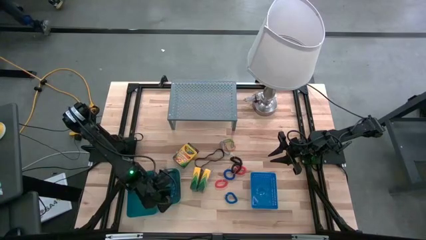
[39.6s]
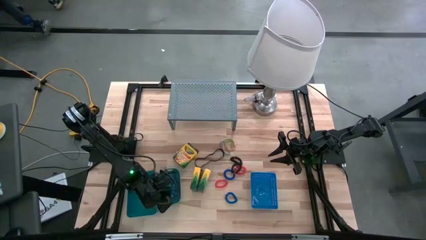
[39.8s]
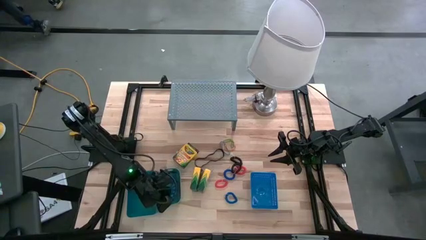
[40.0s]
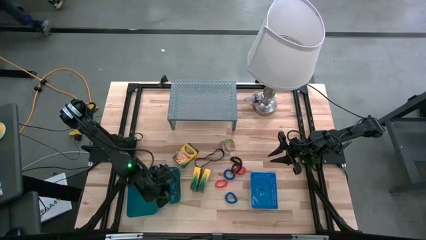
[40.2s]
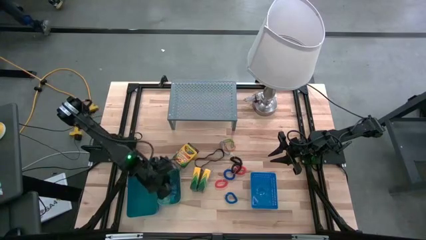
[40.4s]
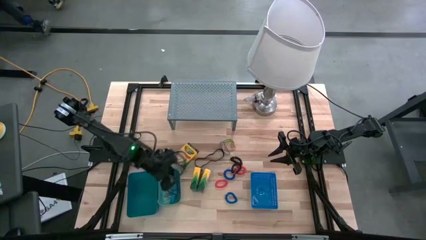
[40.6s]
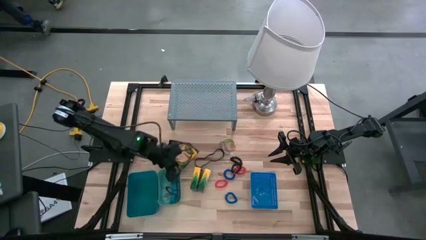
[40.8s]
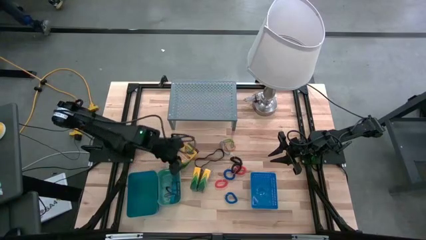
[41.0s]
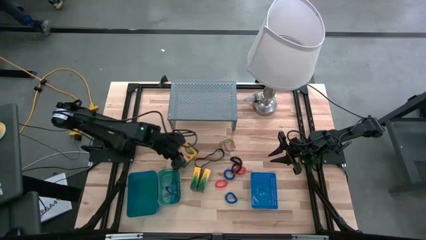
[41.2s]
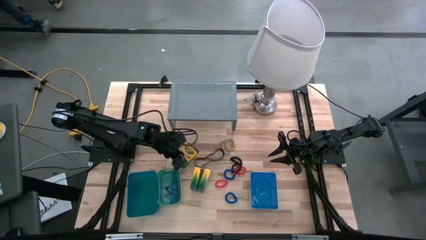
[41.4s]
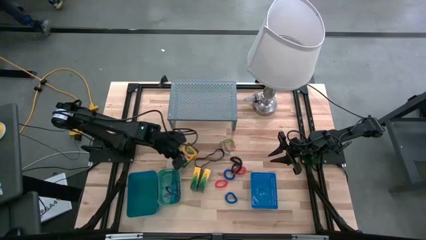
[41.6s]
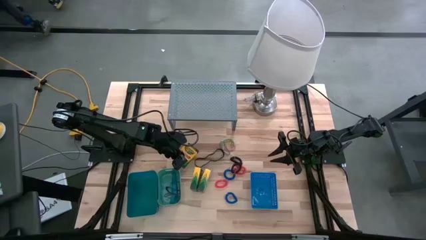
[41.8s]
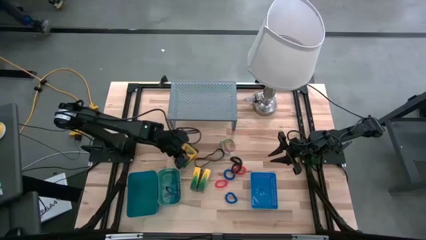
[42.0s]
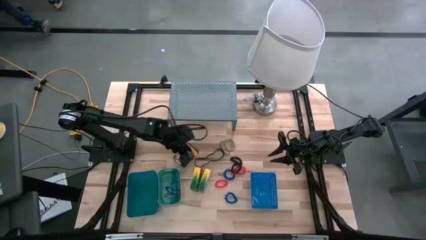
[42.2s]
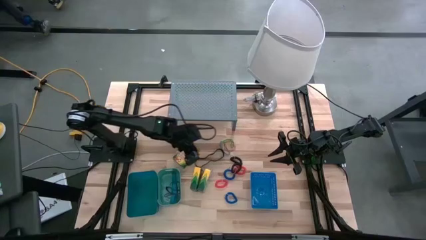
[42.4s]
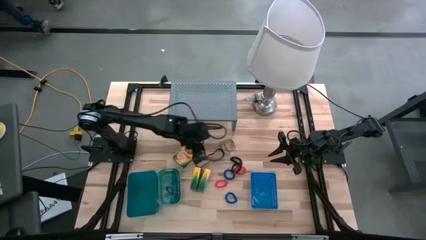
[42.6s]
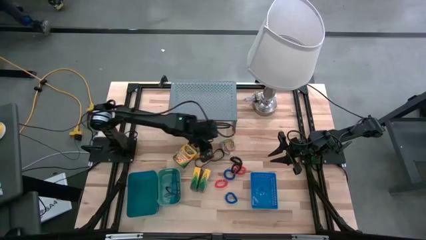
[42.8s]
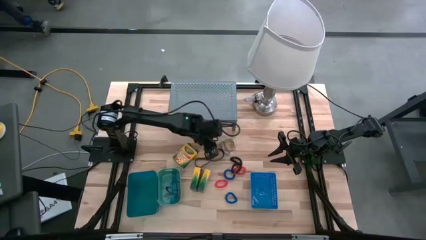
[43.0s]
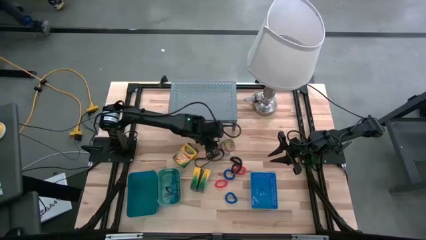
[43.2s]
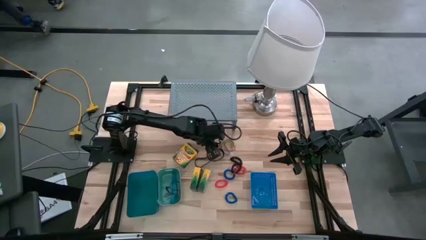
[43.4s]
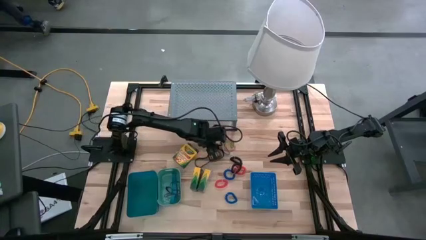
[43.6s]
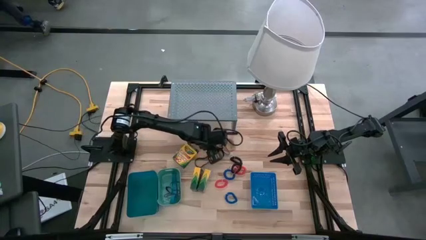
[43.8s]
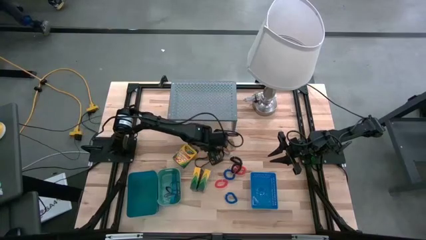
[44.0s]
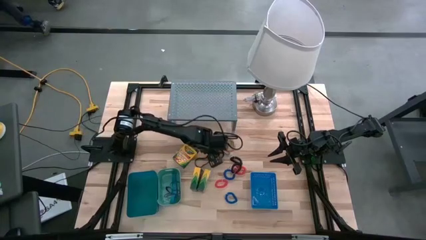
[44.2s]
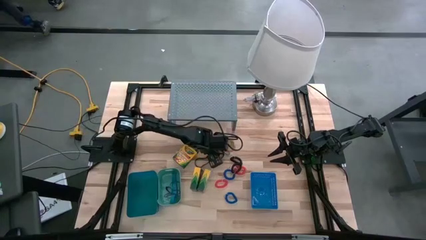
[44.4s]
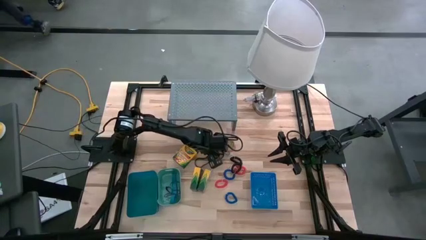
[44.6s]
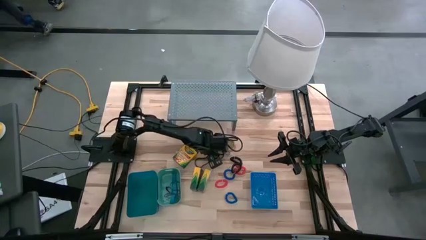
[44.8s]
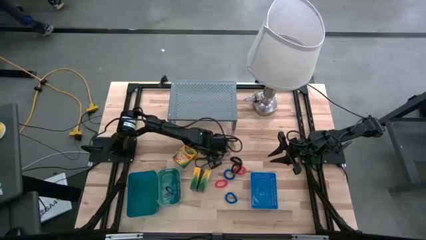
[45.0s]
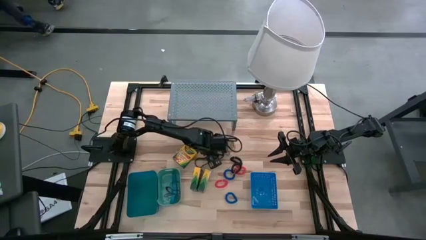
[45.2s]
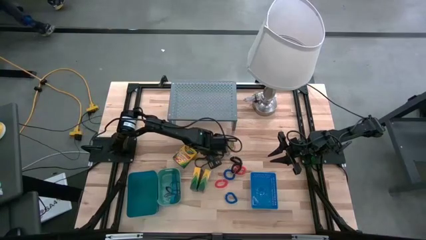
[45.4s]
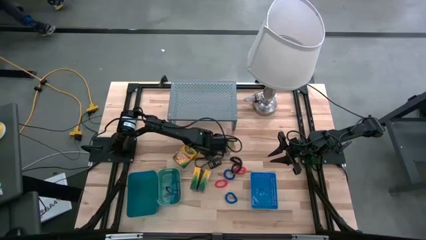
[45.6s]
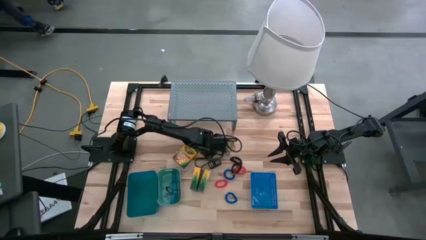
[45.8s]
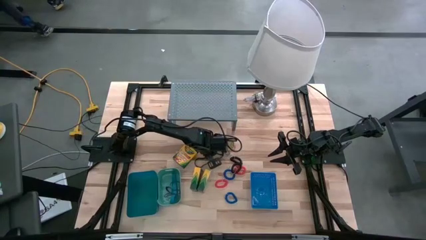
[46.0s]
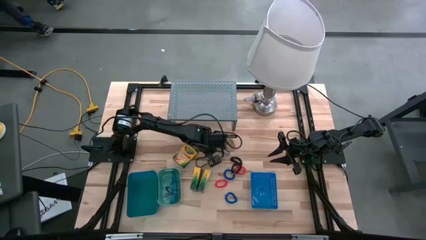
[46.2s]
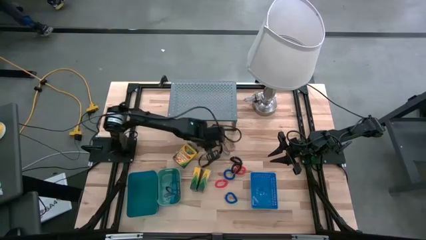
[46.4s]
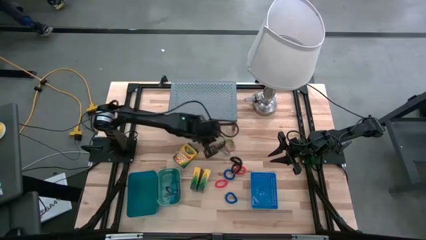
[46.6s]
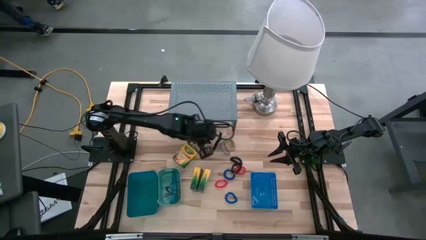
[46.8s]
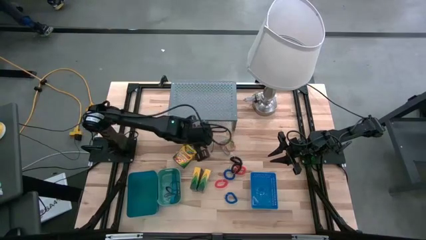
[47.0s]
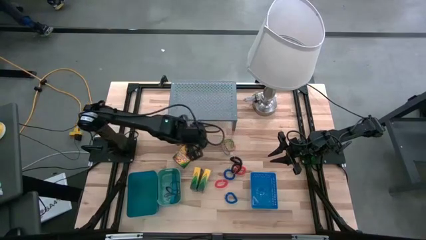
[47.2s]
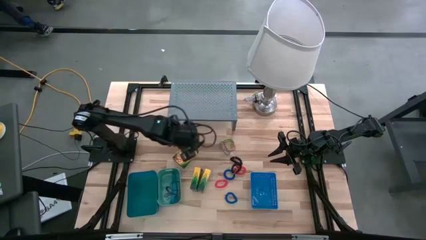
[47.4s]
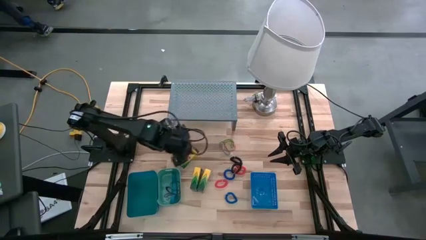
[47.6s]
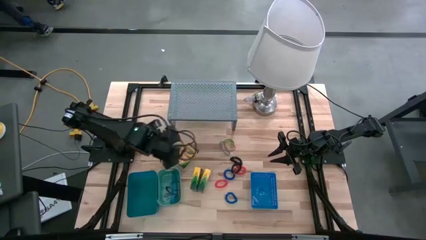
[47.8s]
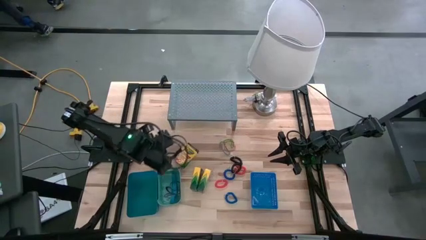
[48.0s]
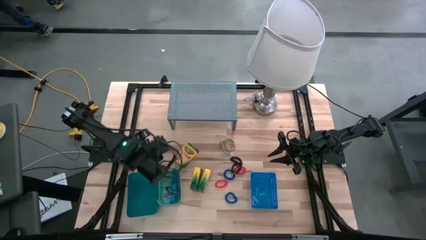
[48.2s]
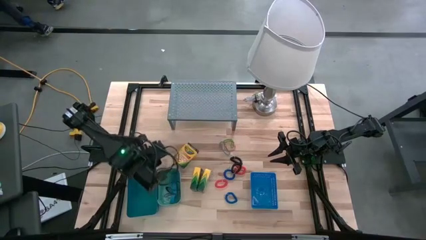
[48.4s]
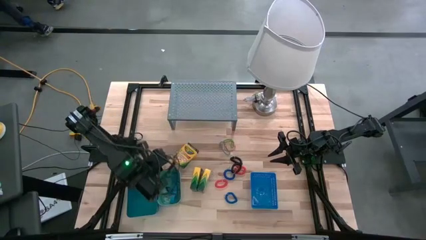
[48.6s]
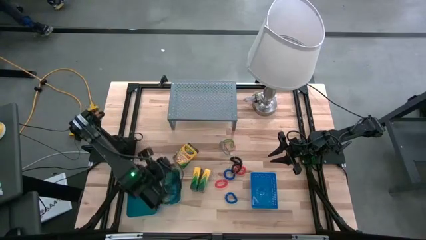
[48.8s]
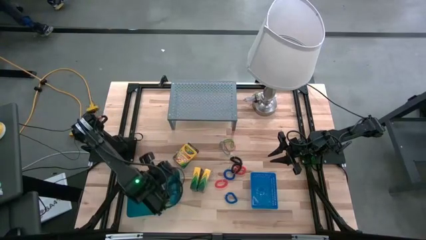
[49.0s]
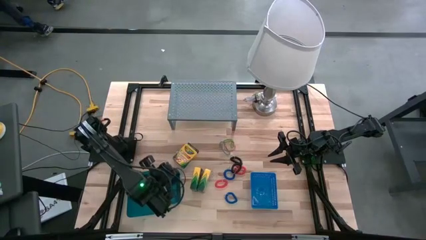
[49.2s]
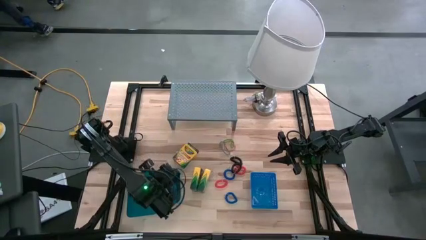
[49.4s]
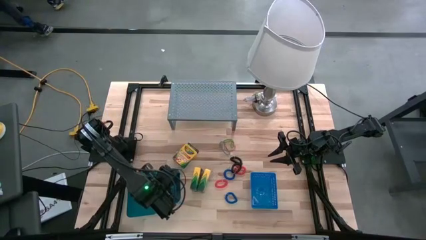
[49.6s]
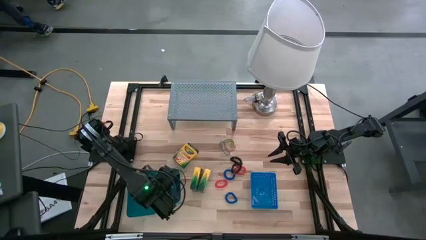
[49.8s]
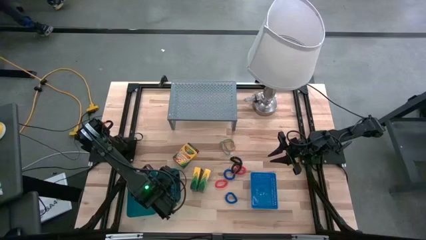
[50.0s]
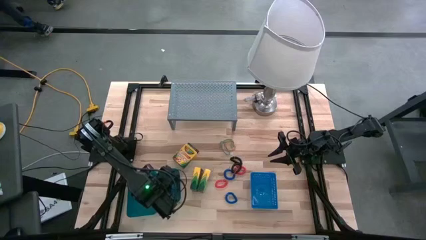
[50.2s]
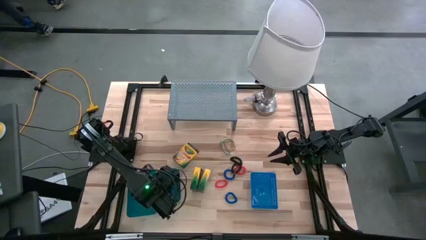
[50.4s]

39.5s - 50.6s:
Task: Pick & Place Office Desk Supplies
Put the black rubber band into the green bin

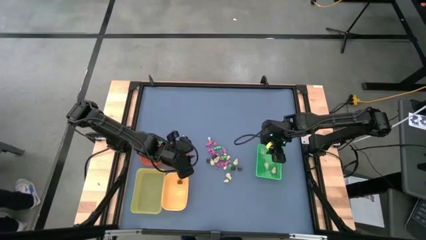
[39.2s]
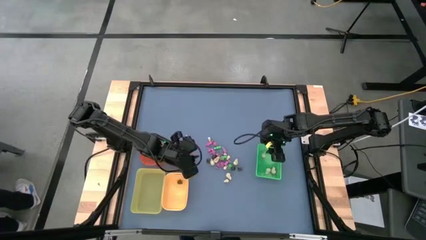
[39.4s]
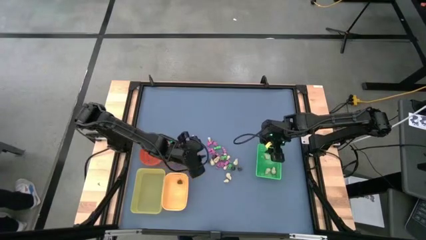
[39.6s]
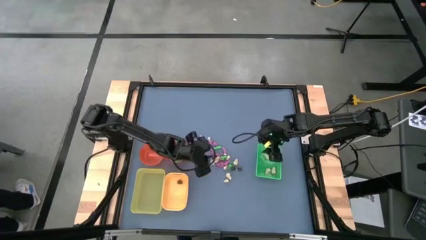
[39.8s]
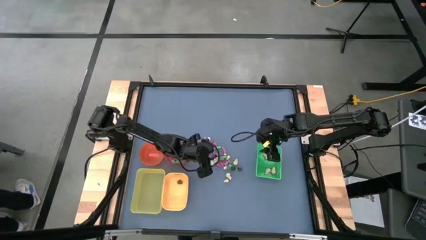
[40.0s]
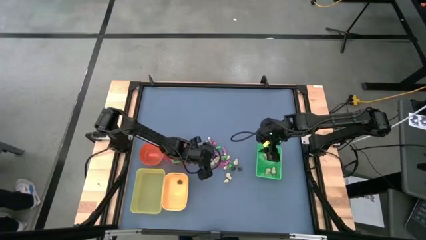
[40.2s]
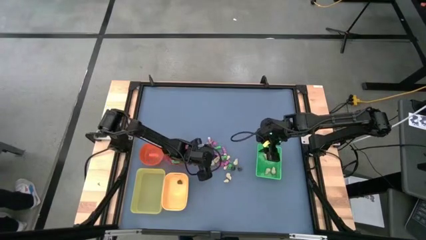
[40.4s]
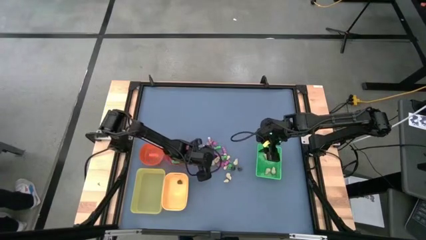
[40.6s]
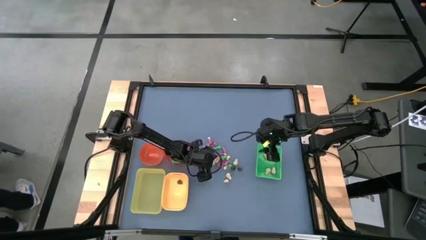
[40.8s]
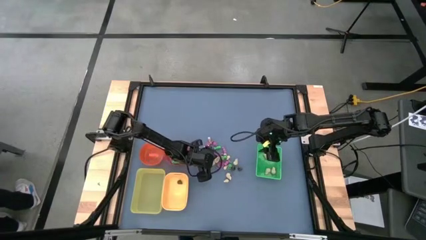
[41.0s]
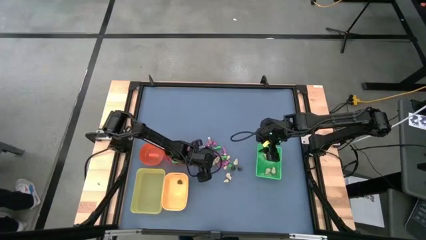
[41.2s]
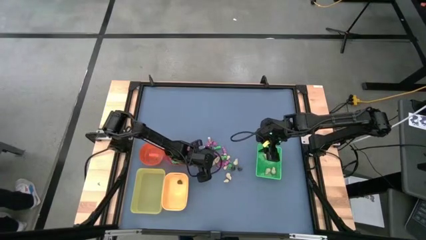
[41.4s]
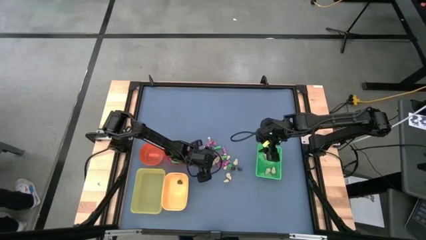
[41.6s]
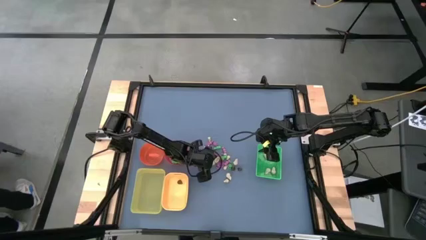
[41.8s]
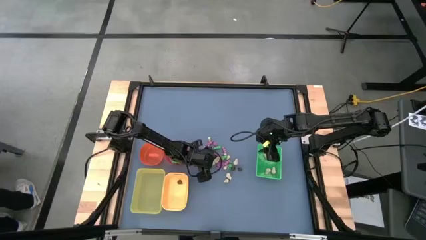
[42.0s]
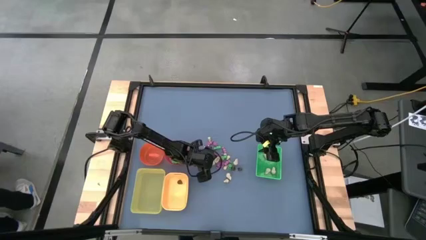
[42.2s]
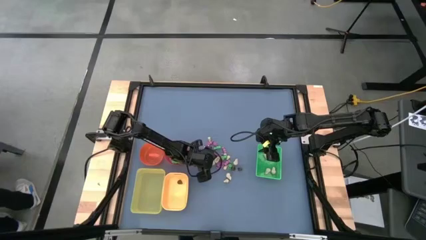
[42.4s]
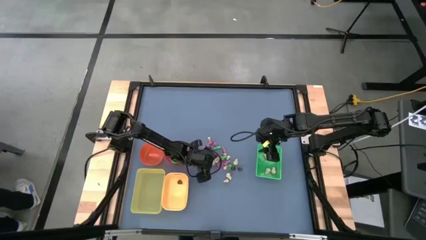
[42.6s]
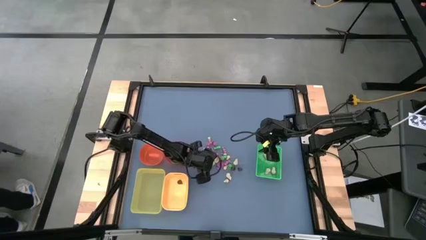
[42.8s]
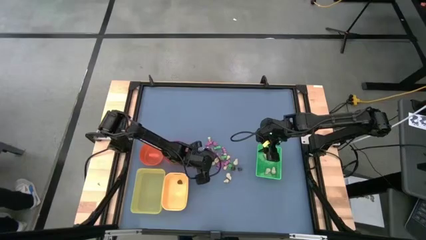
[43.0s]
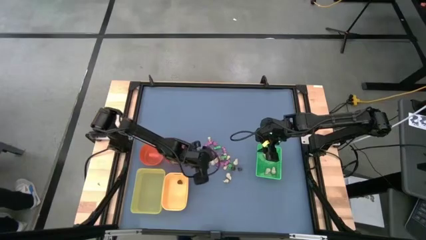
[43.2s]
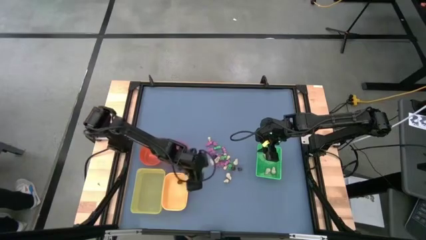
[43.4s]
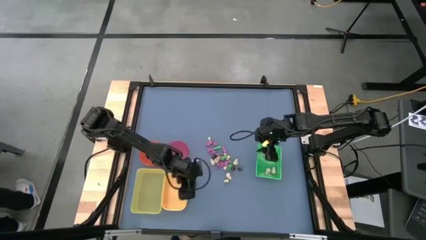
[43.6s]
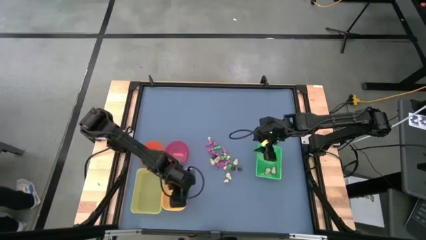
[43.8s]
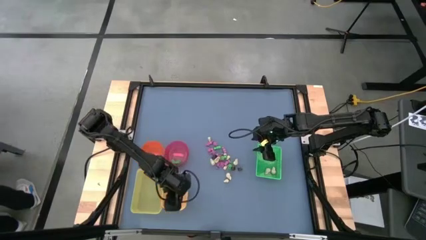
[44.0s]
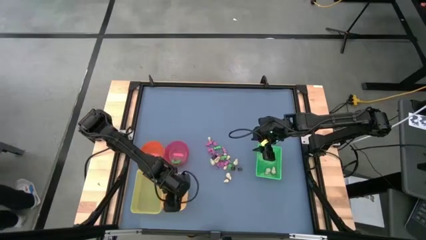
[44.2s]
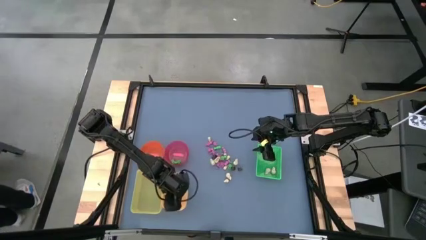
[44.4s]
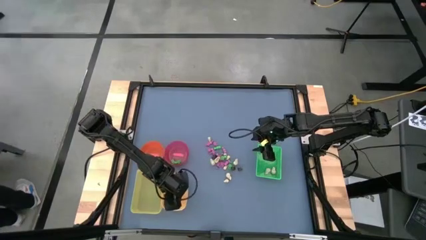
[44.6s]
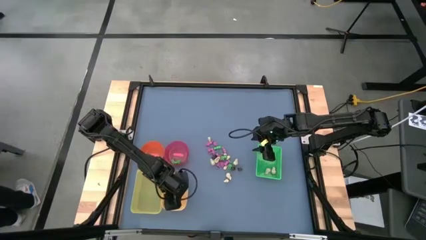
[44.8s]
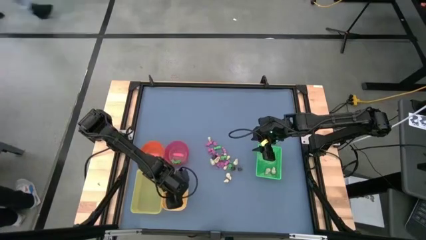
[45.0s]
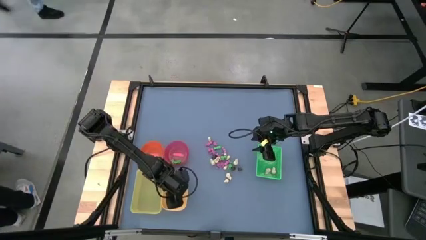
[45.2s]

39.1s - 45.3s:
Task: Sort Halloween decoration
Put the black skull toy into the yellow bin
